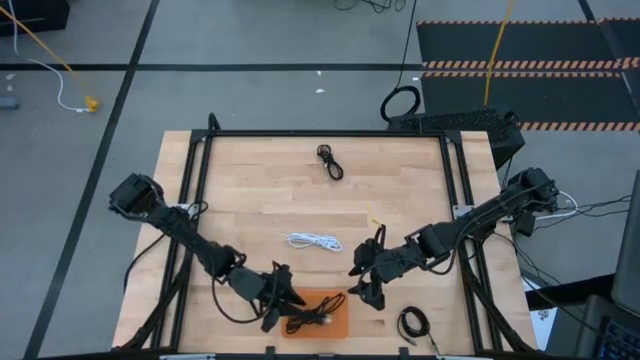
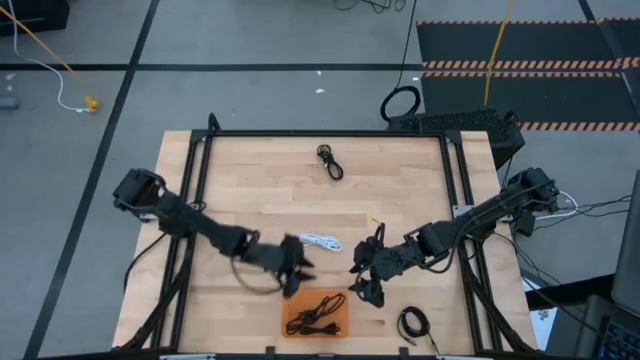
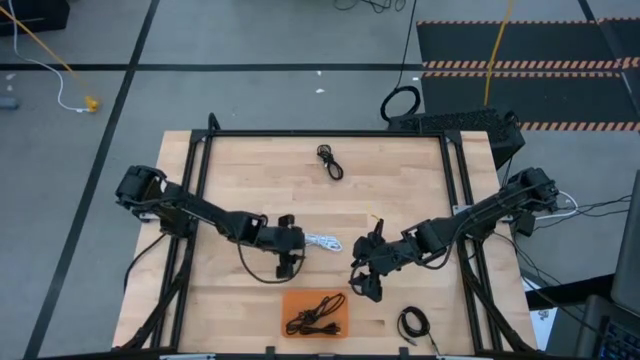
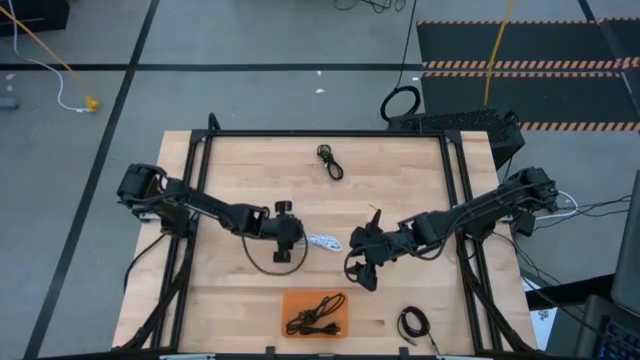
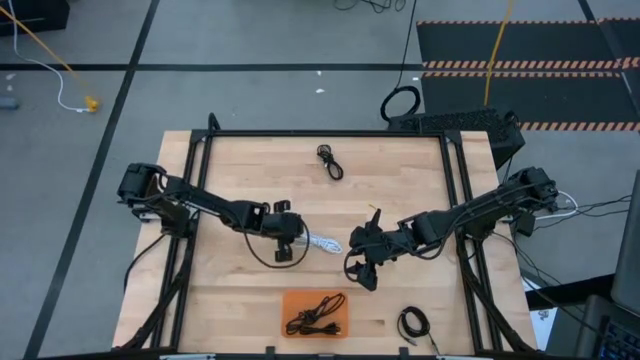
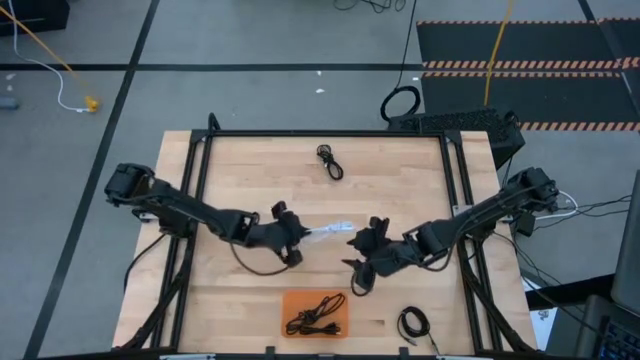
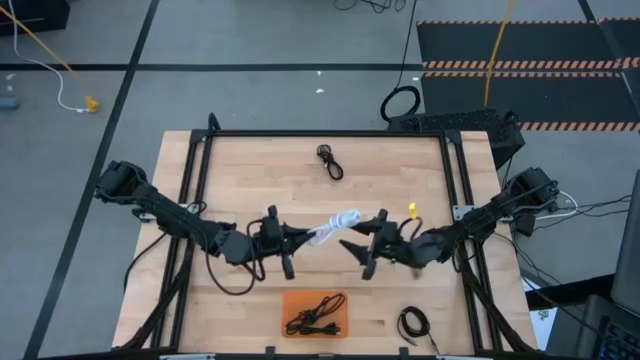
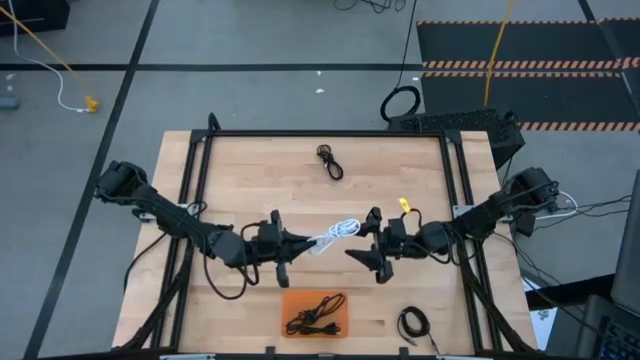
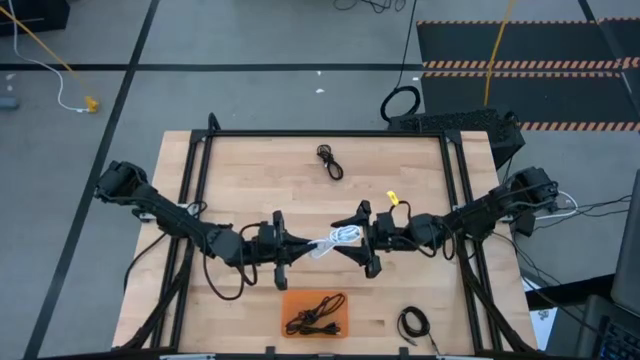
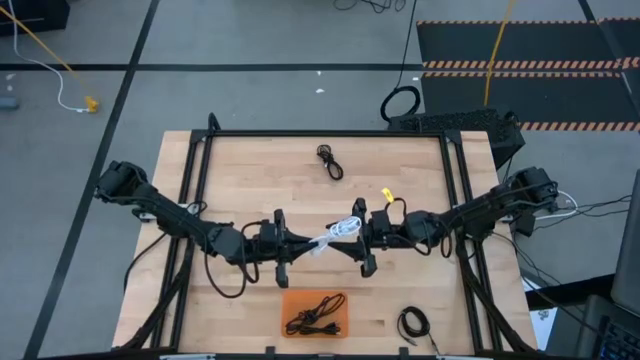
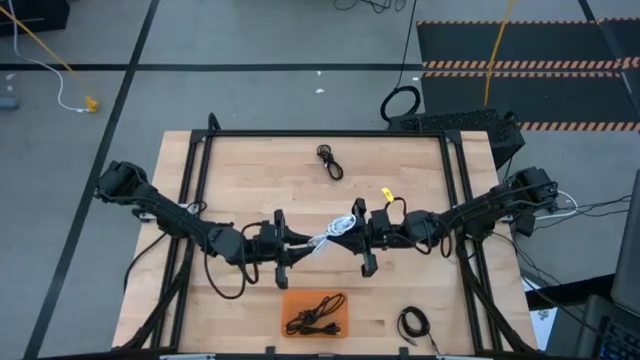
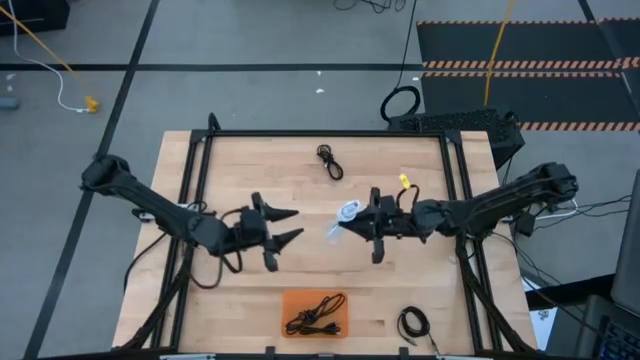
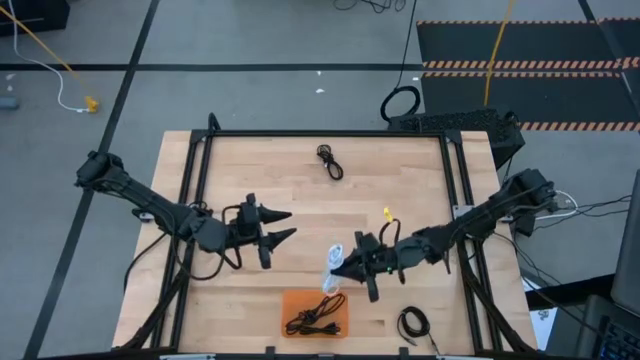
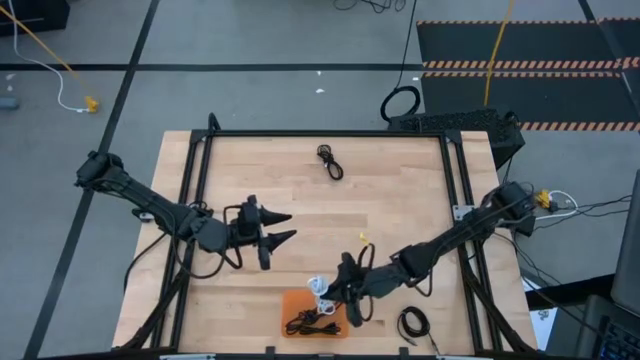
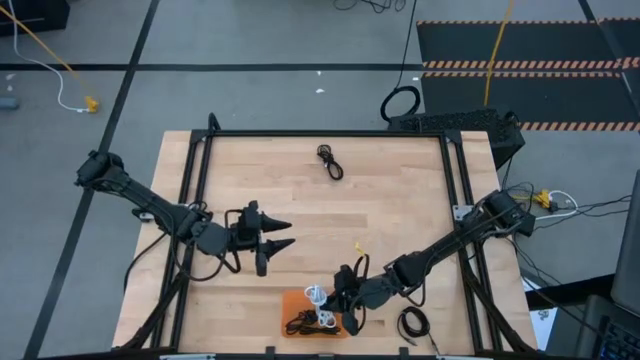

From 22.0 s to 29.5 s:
Task: Pick and place USB-C Cables
Put the white charger cable into the orange bin

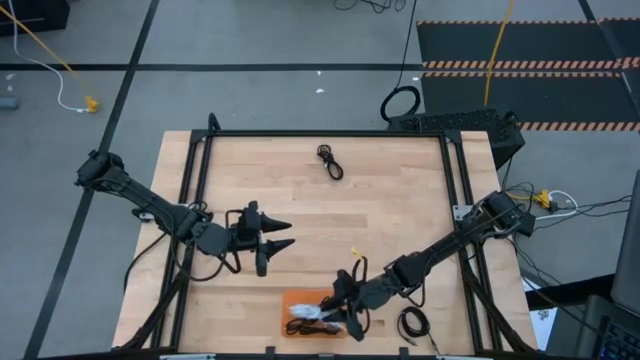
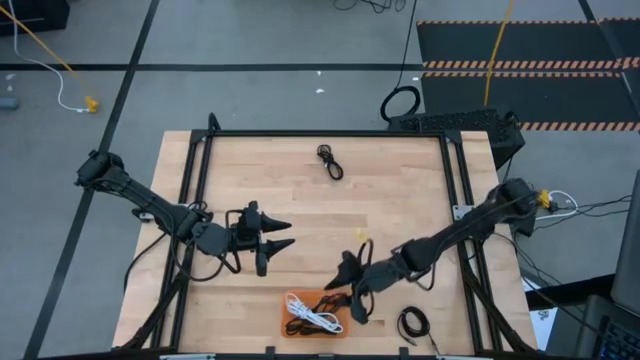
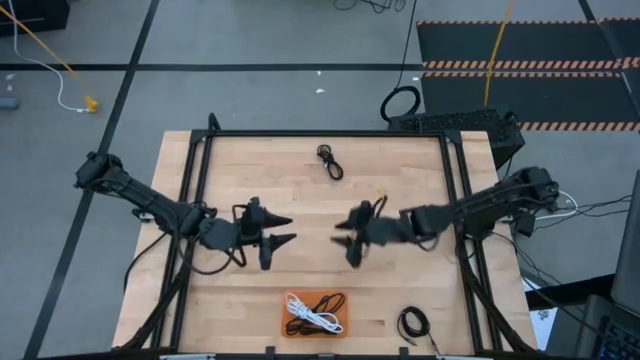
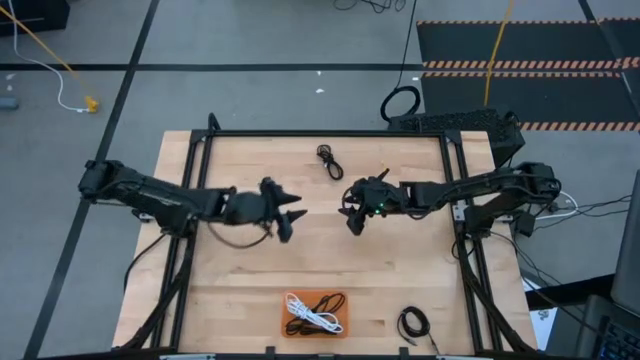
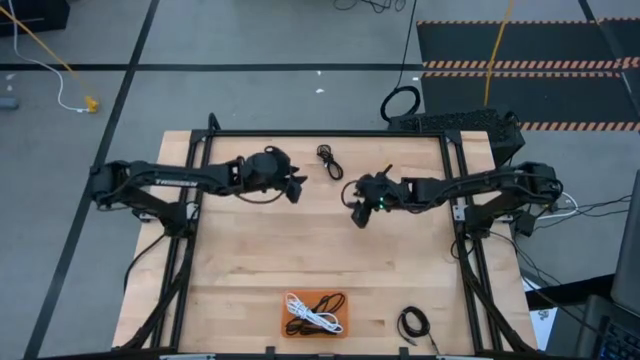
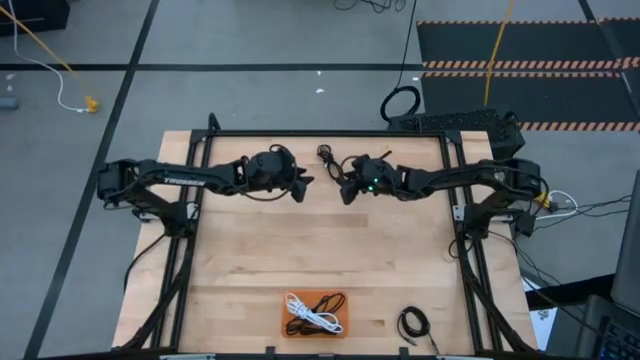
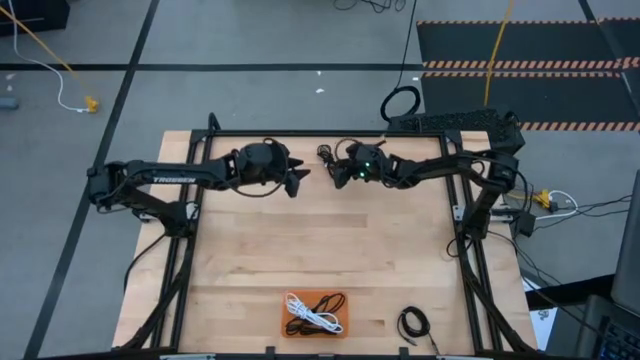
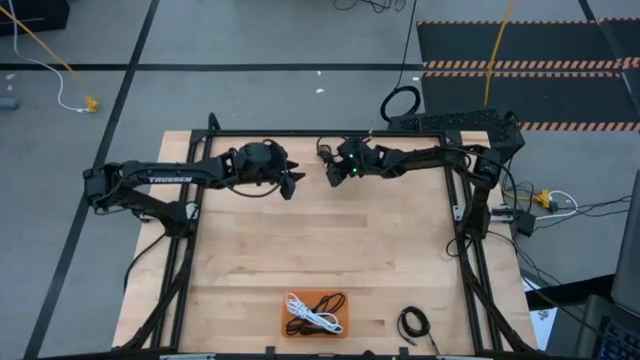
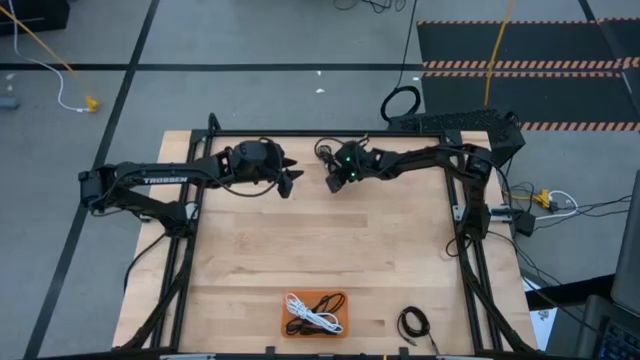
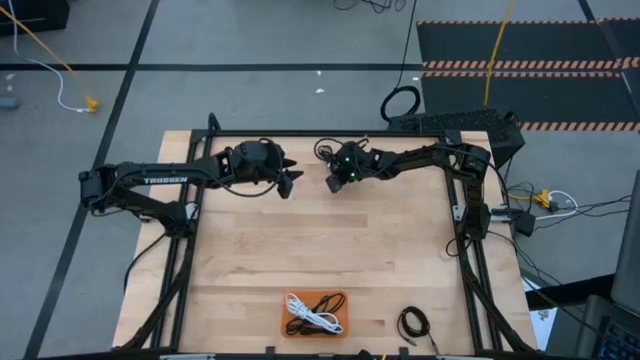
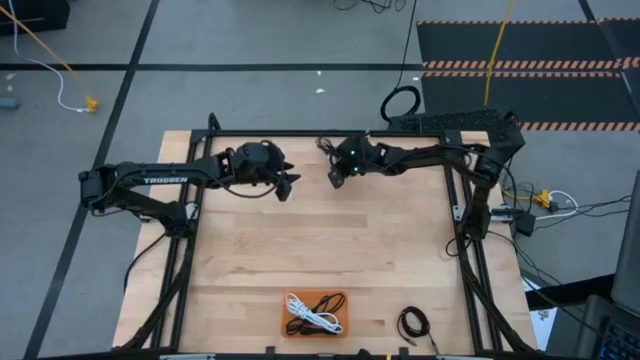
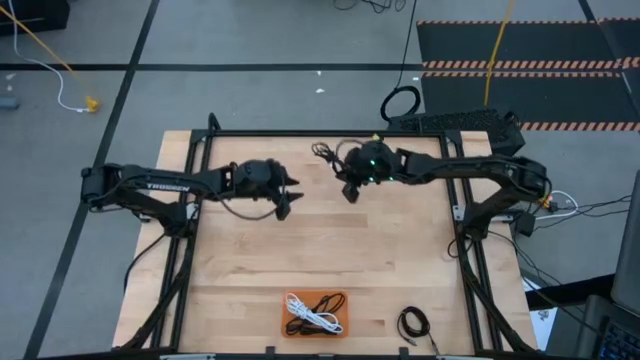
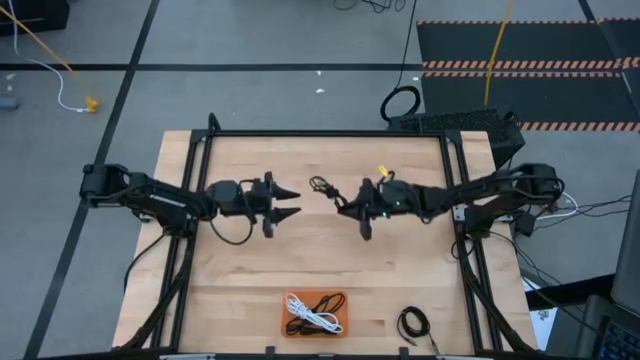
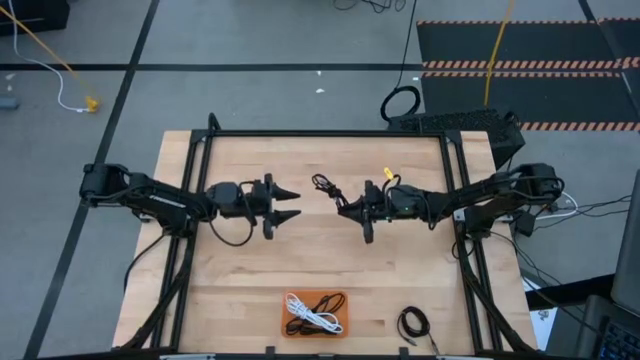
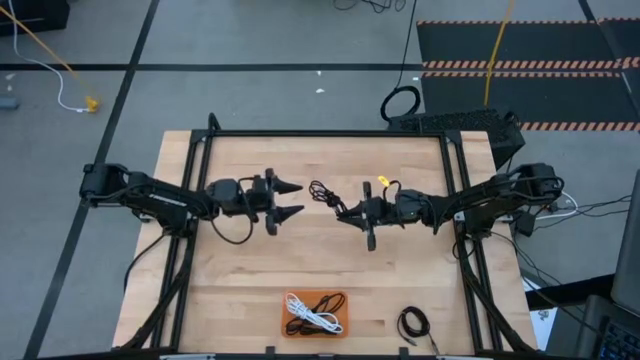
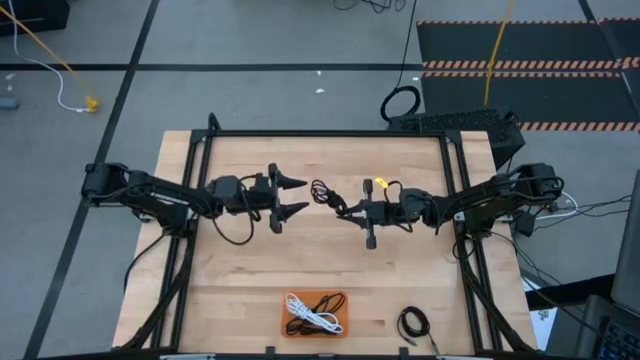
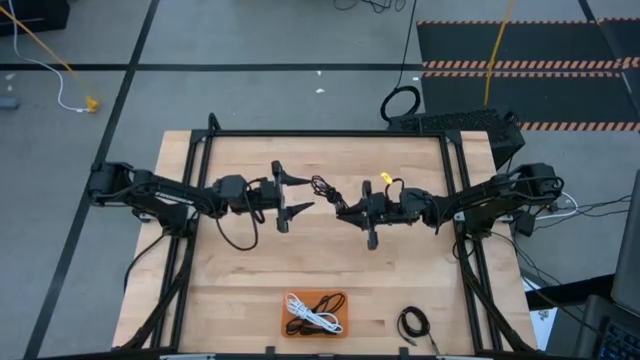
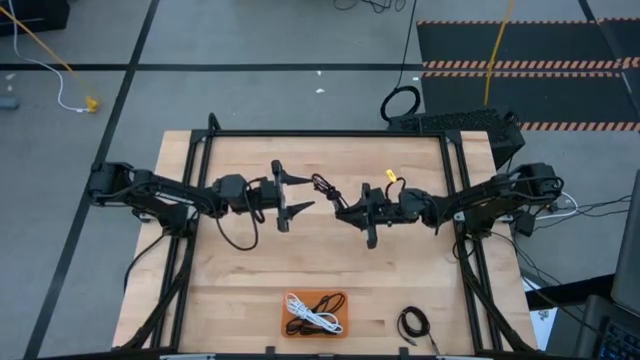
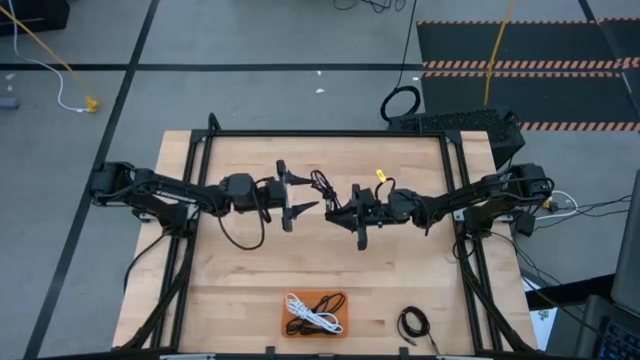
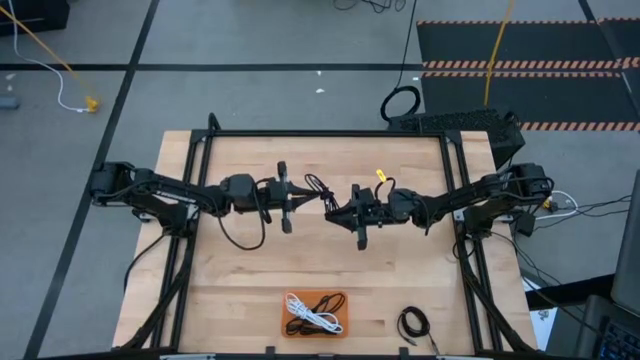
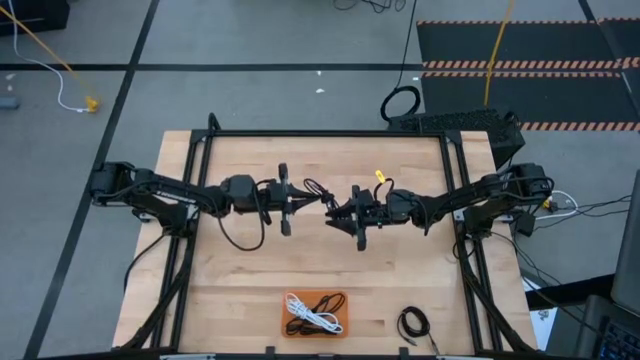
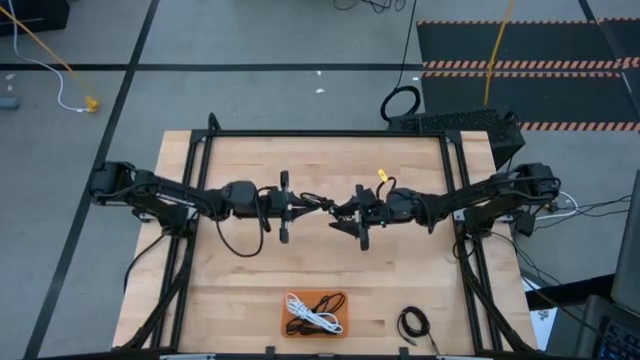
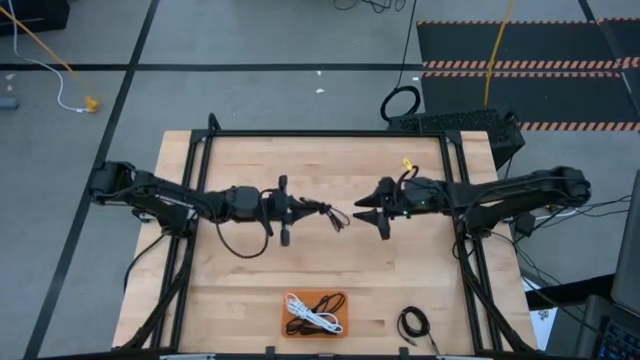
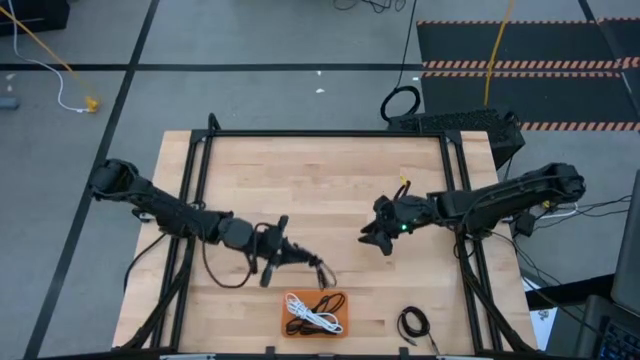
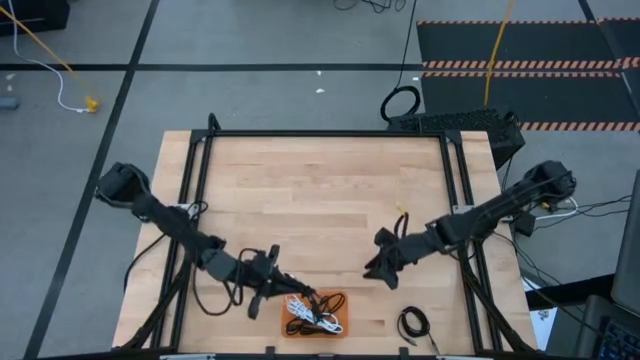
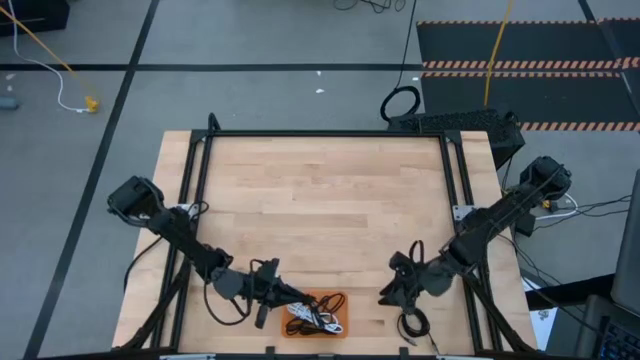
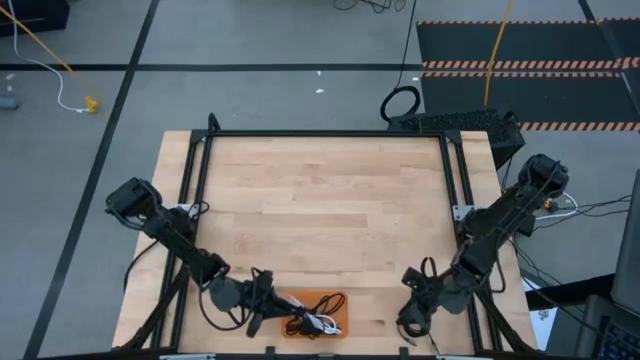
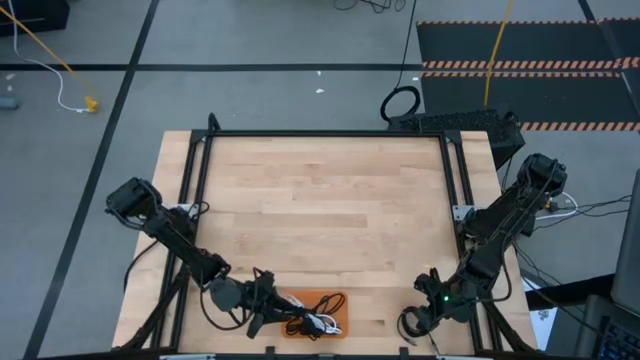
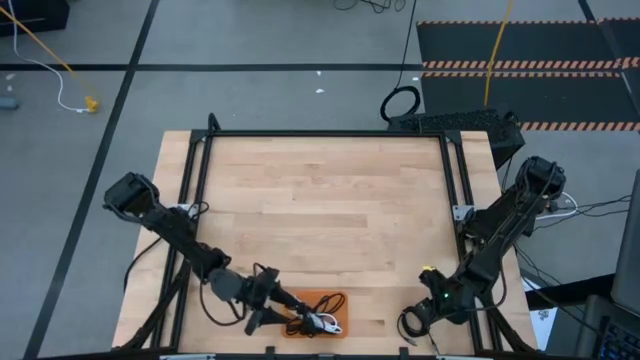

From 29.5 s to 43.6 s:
Put the top center black charger cable into the orange bin
